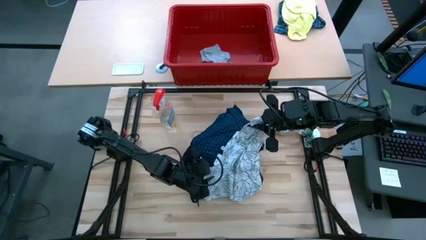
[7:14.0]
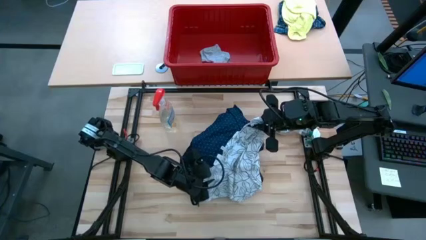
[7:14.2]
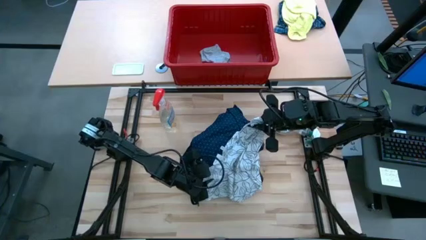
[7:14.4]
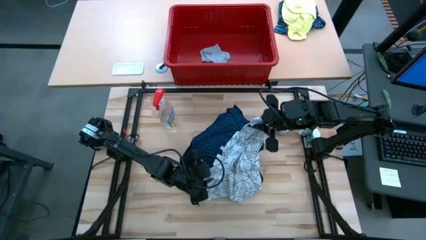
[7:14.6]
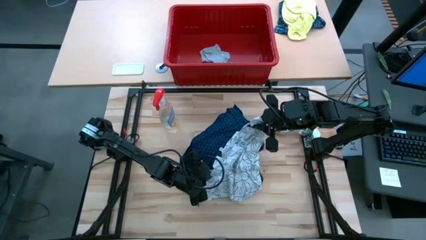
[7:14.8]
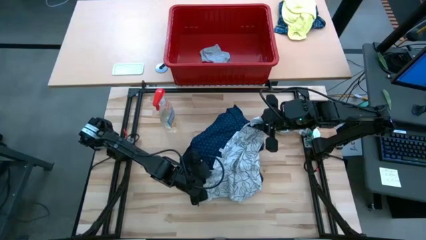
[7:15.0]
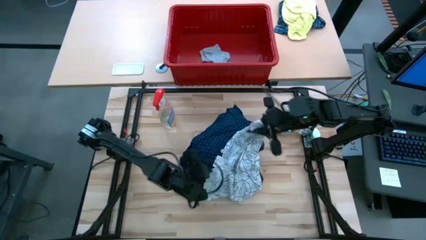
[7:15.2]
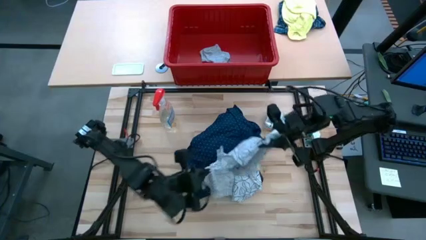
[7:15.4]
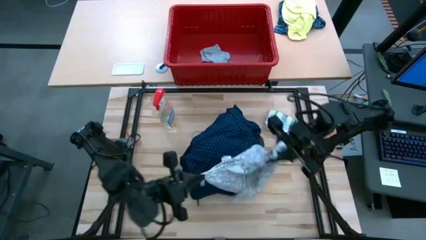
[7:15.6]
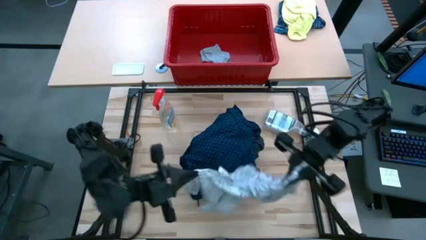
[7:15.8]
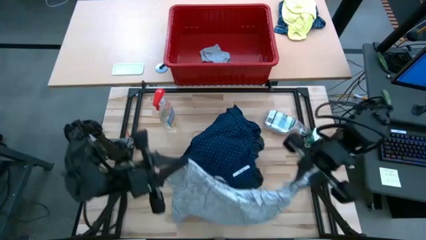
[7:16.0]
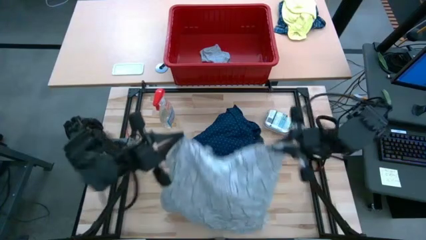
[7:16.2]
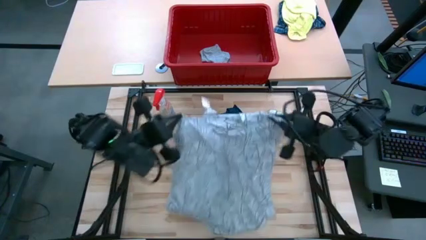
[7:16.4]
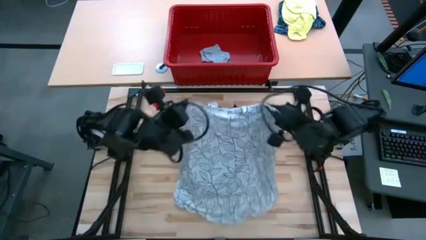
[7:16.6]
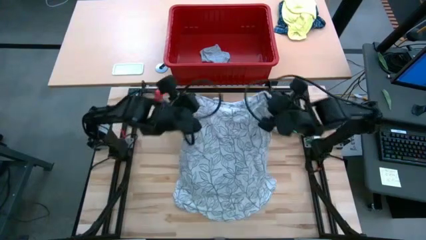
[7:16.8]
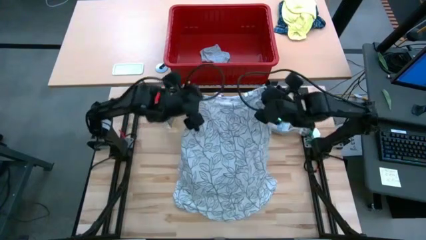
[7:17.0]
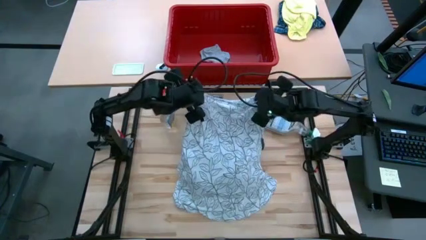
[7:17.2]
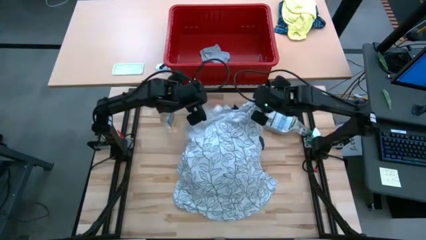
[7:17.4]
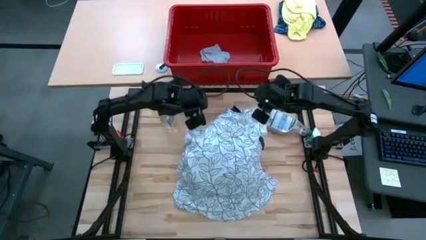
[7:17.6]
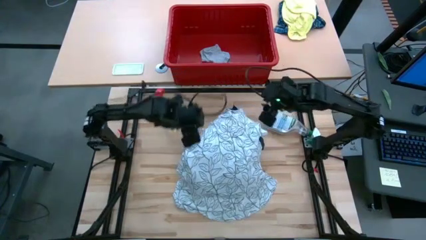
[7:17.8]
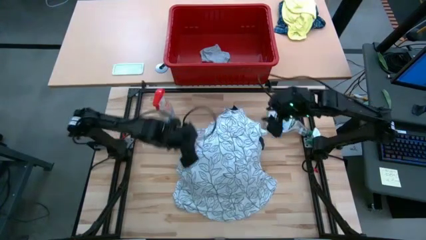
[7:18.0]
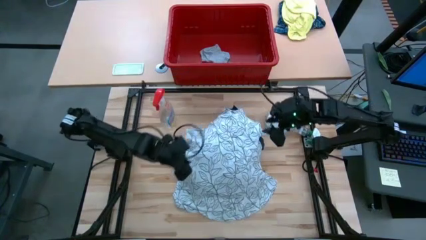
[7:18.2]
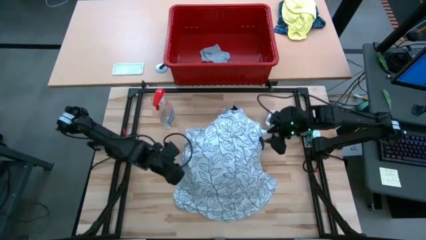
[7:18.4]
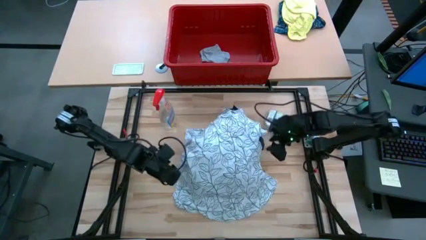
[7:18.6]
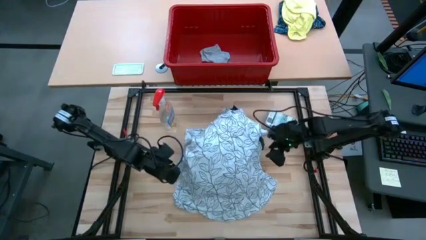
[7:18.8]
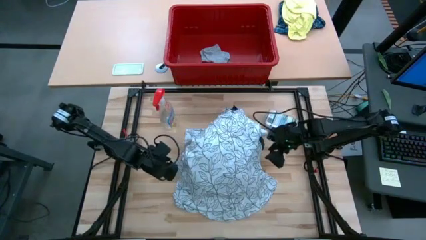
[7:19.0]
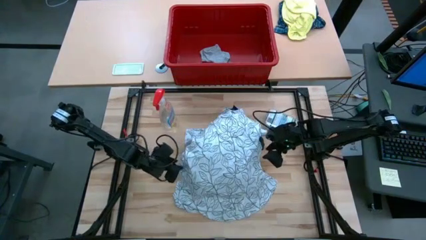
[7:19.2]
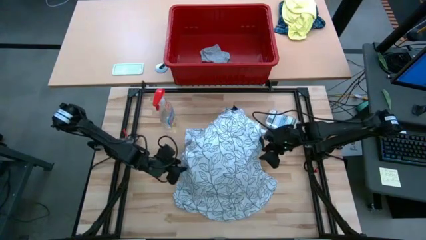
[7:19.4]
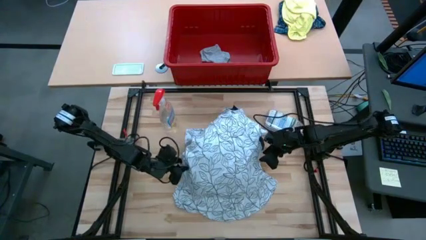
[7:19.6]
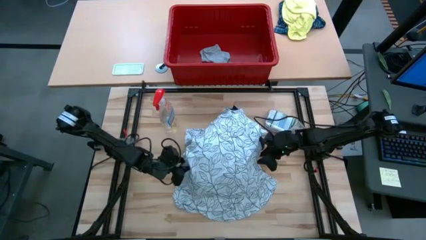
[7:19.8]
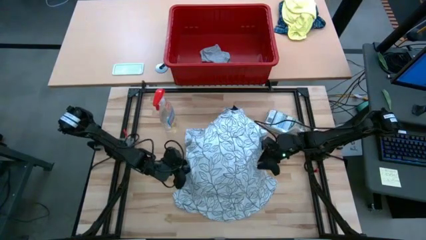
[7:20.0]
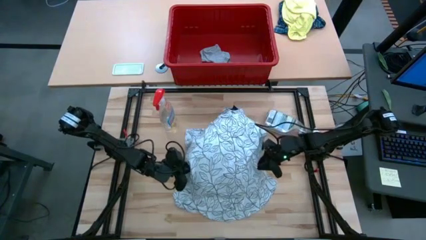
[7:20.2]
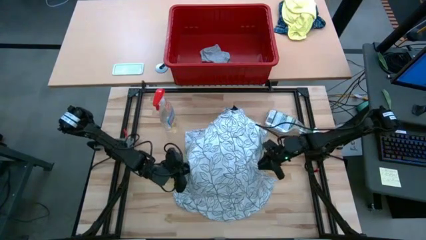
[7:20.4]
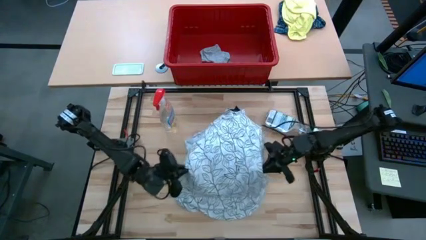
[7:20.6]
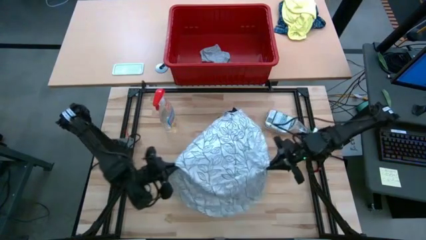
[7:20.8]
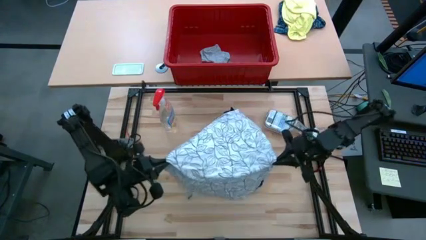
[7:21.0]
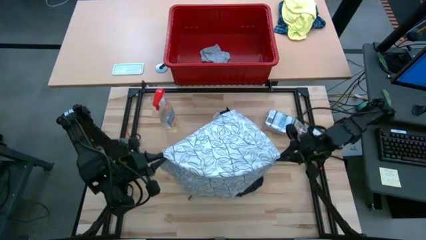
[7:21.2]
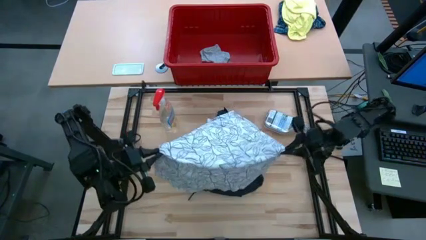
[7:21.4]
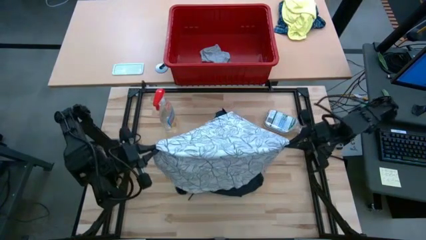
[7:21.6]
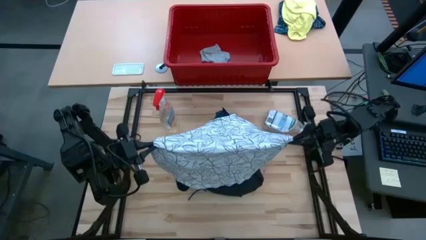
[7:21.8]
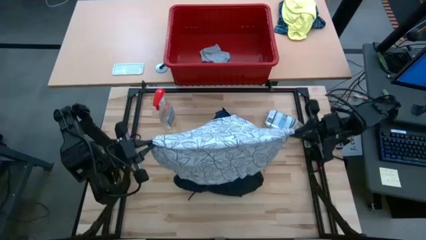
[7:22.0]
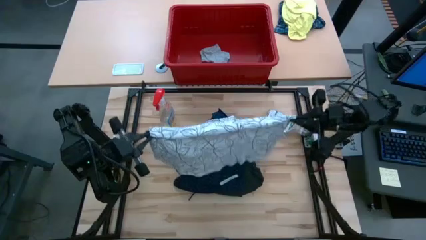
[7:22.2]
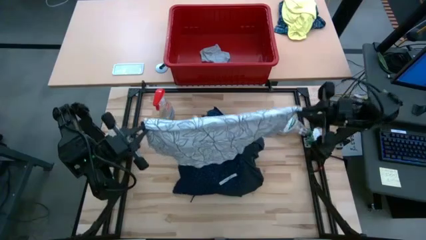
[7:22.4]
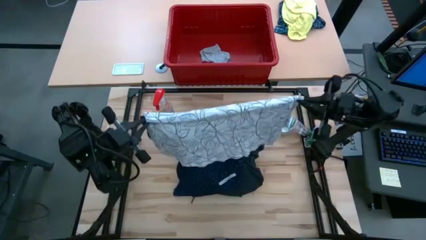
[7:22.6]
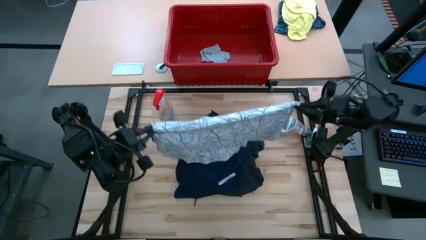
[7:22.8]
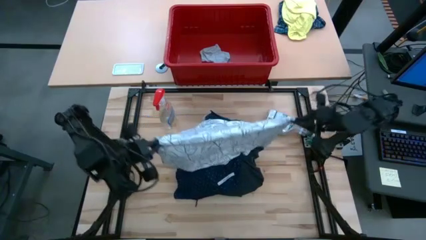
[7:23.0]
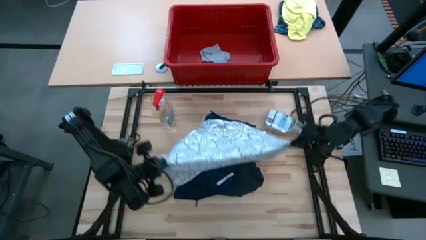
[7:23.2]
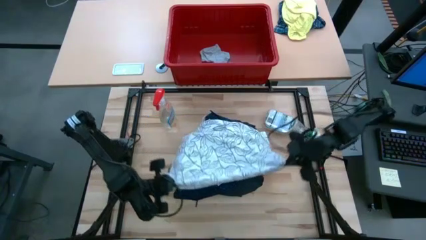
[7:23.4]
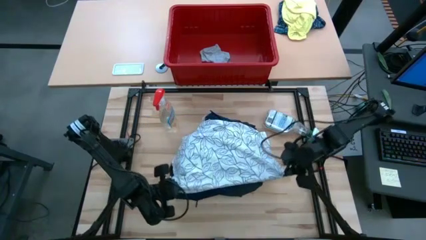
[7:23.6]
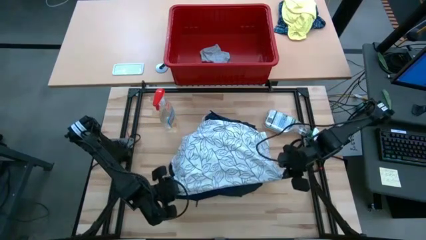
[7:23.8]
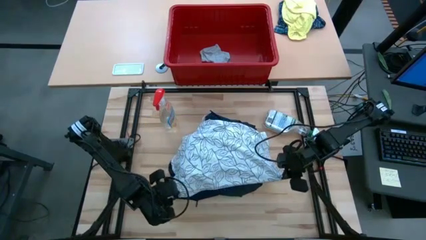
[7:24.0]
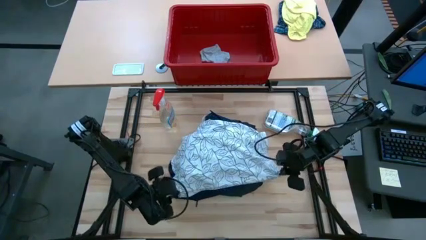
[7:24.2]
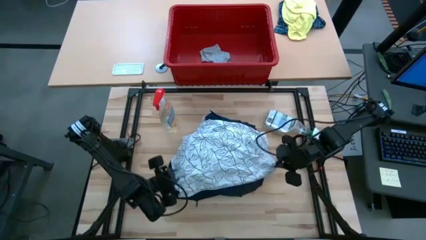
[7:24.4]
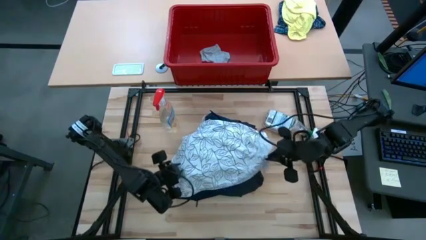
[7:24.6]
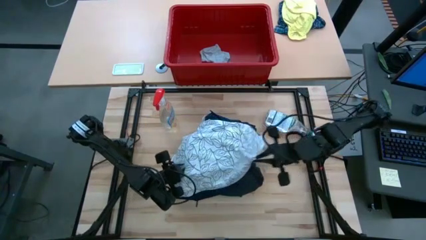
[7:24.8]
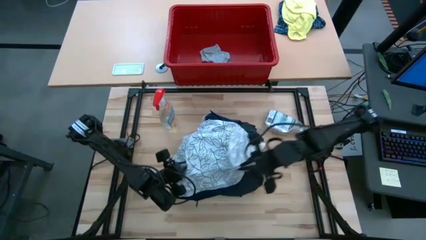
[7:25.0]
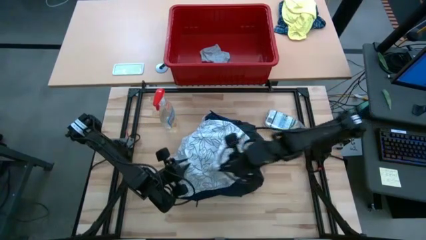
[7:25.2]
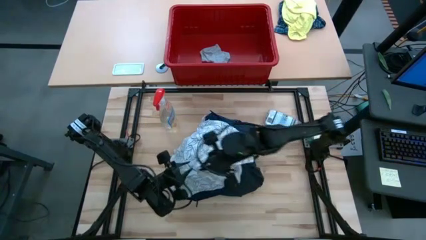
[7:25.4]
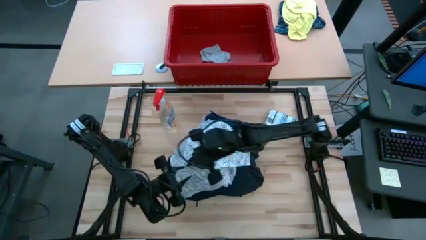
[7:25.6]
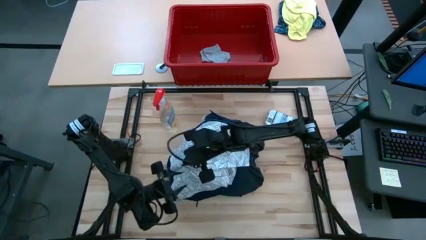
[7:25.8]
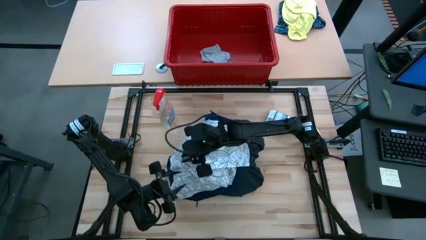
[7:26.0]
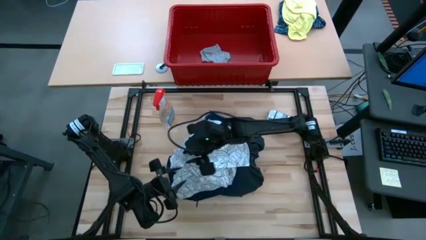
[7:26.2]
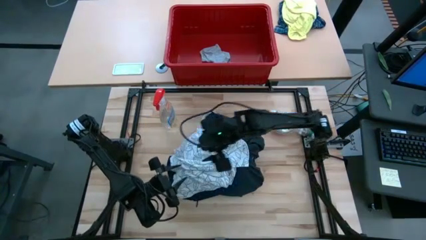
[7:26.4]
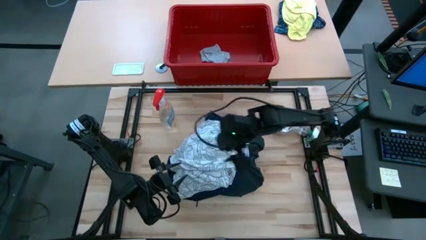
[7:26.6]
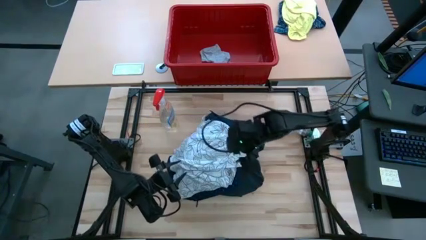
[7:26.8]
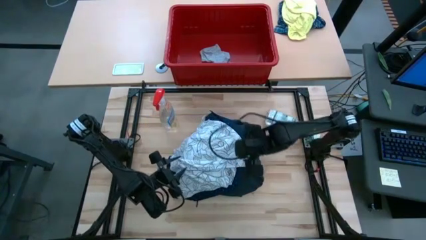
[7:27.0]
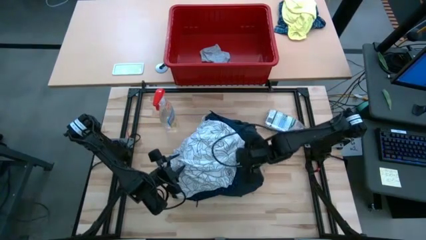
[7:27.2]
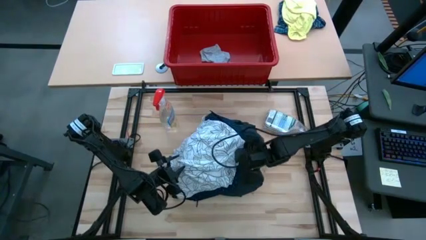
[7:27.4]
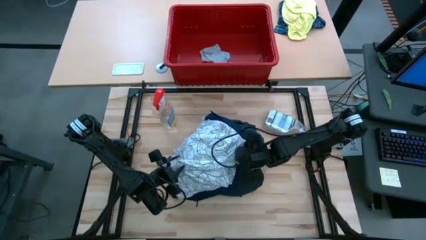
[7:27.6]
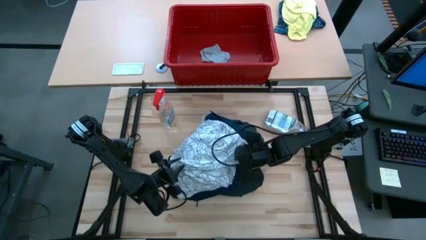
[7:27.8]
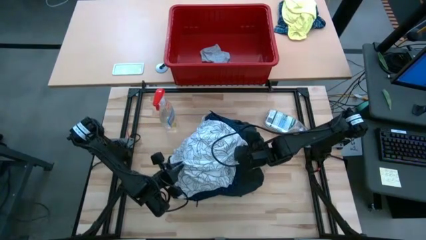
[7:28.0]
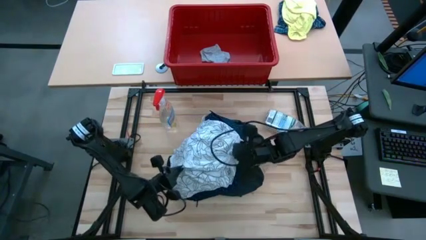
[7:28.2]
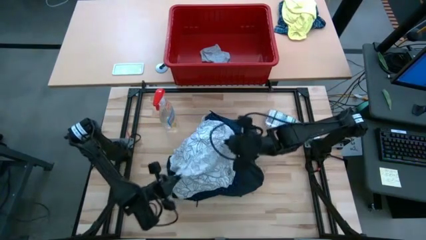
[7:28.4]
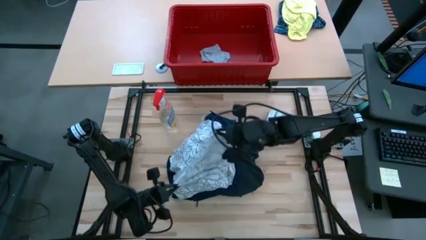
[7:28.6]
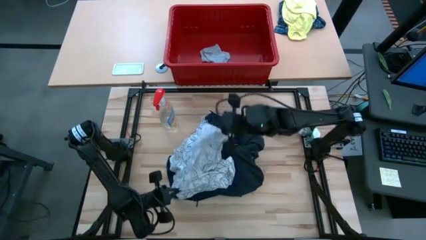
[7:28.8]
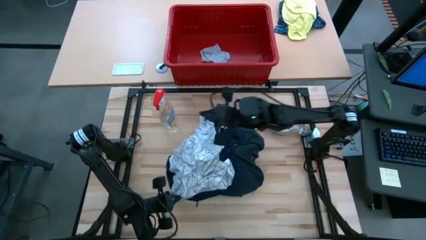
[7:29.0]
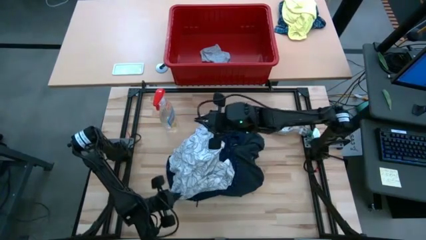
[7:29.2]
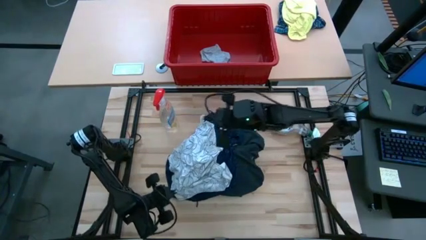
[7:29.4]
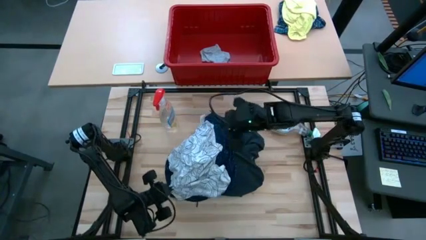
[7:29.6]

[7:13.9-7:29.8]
Task: Fold Laundry from Bin
Fold the white floral shirt
